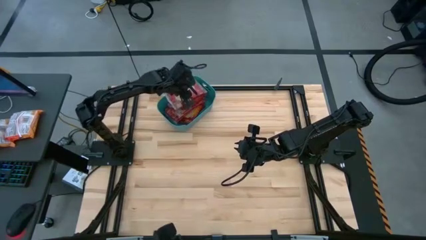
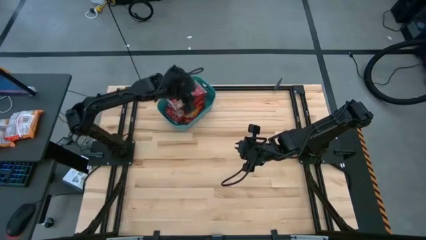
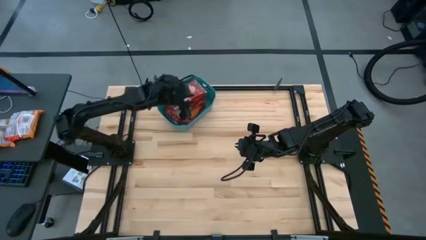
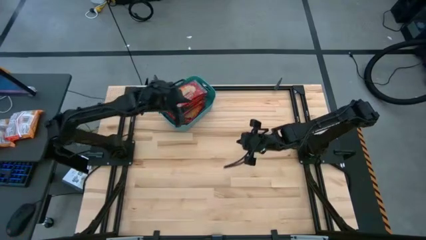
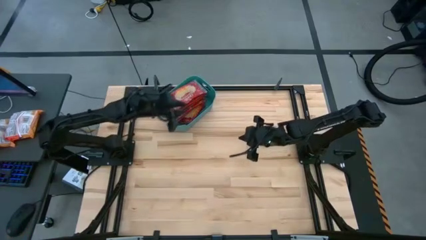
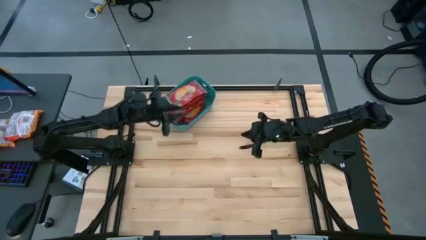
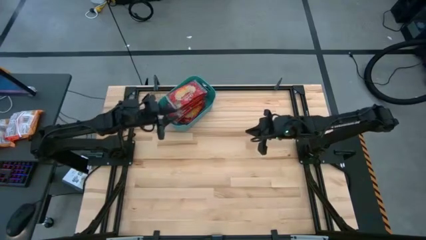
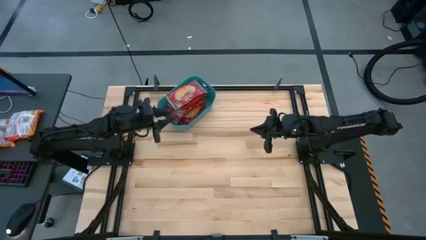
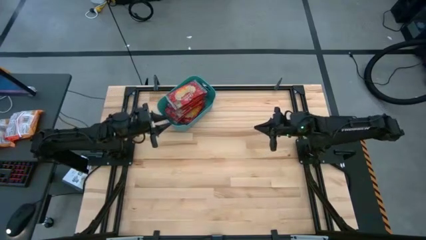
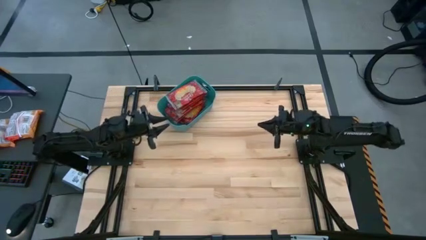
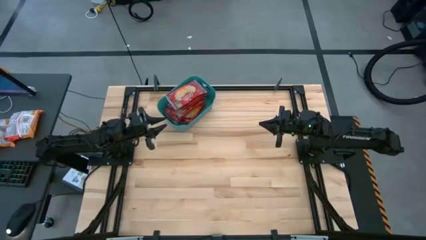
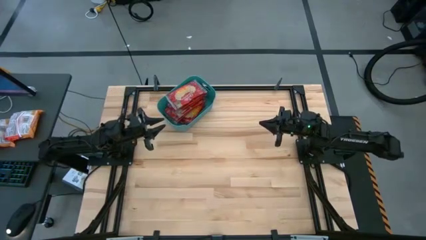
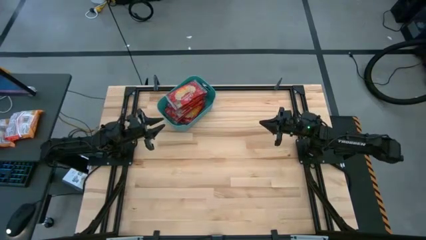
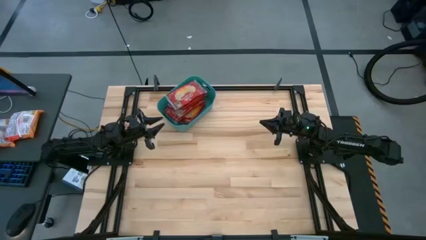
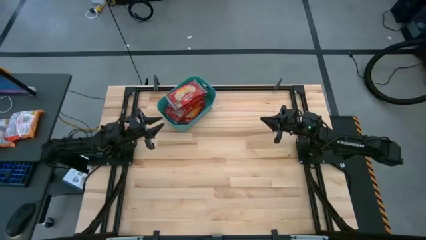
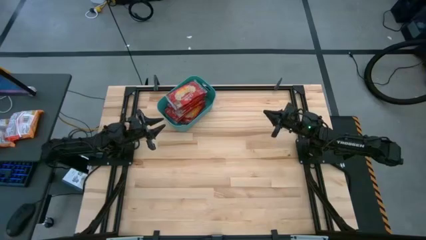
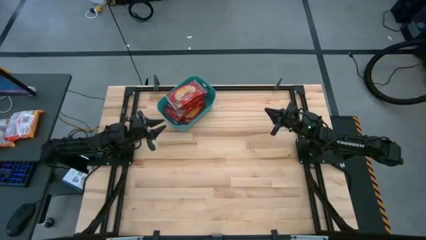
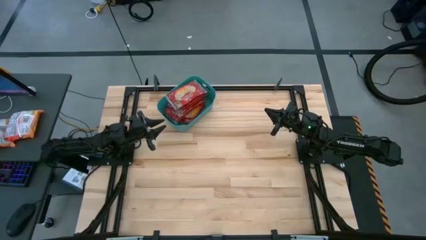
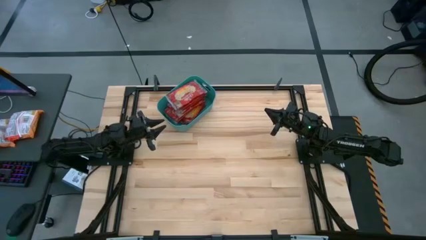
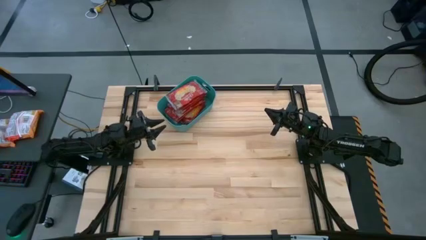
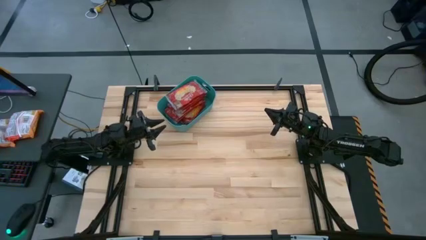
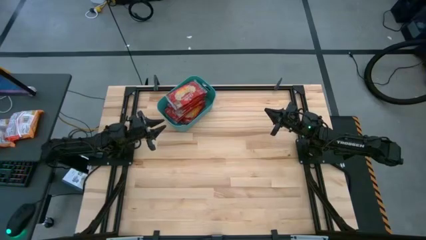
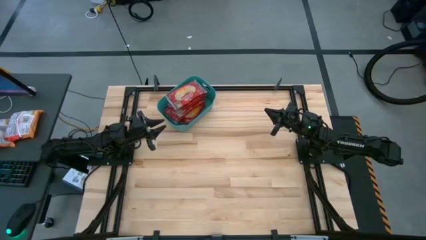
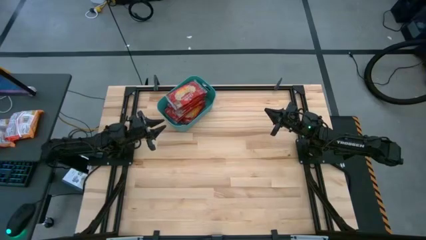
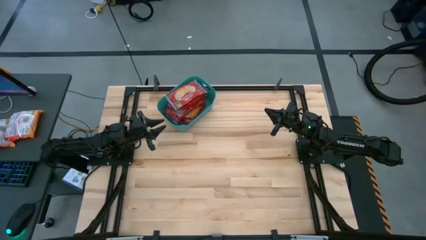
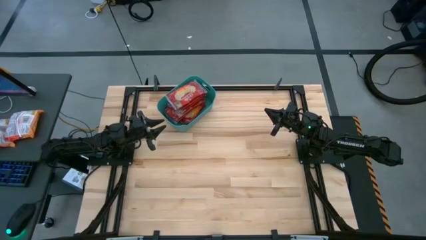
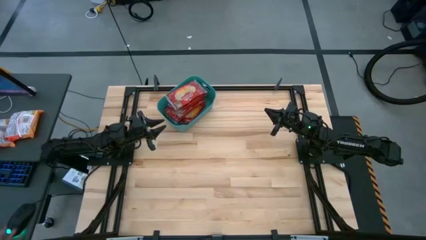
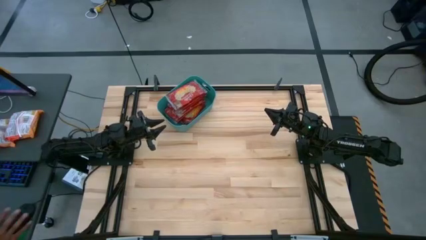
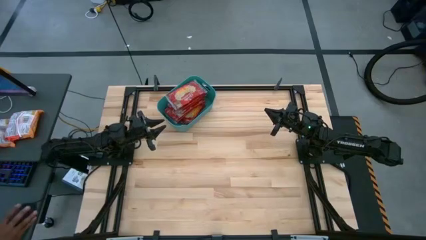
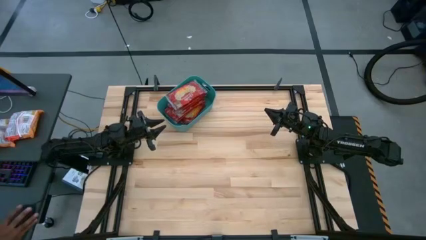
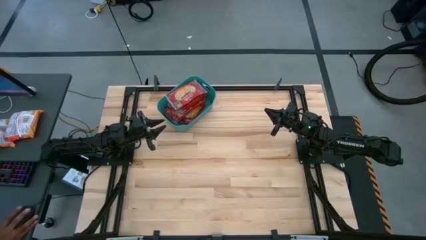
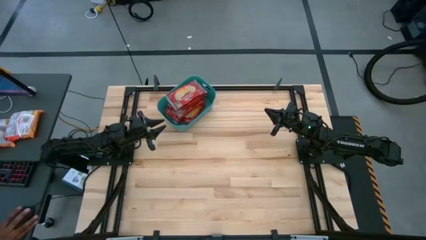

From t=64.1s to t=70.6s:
Task: Sort popcorn bags into baskets
Return to Home Position

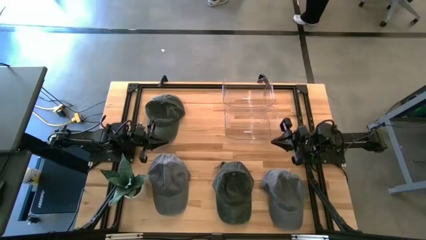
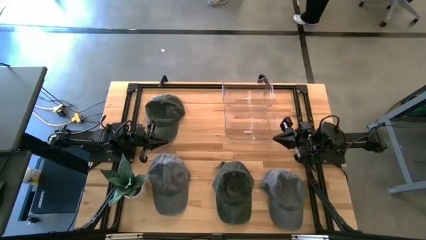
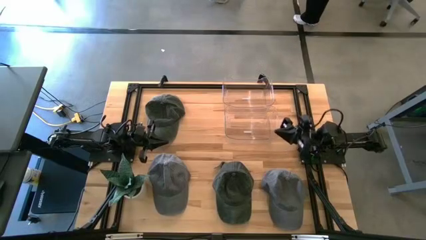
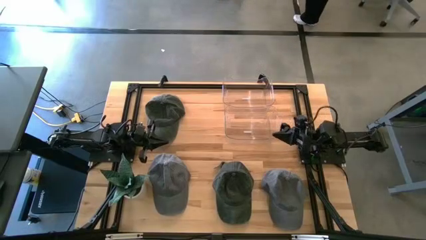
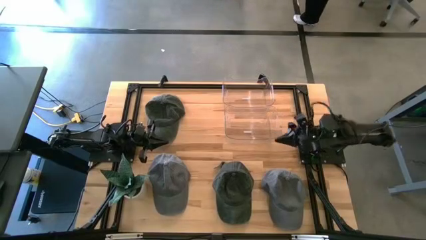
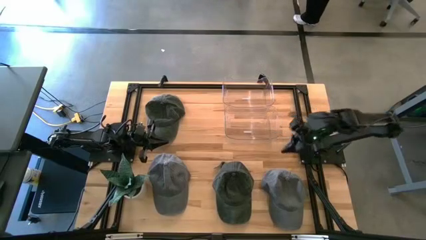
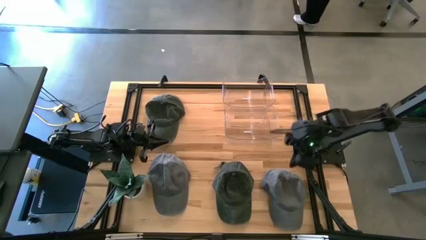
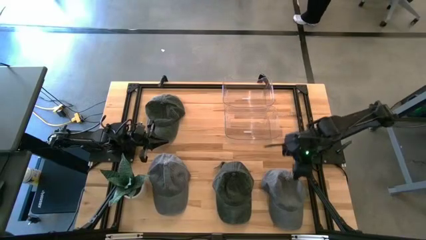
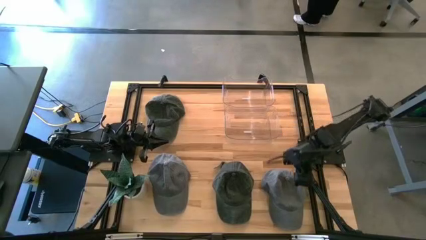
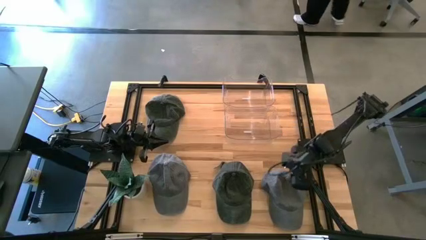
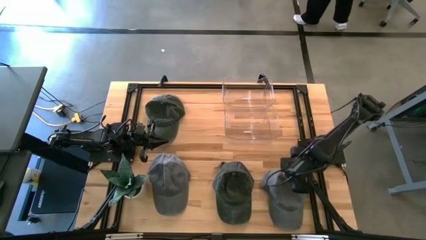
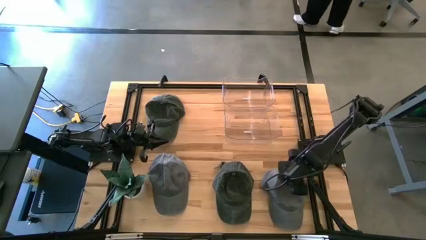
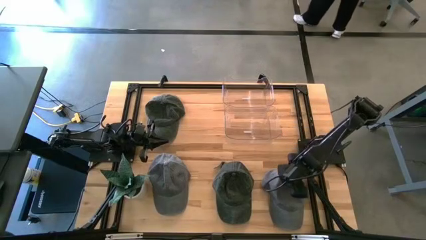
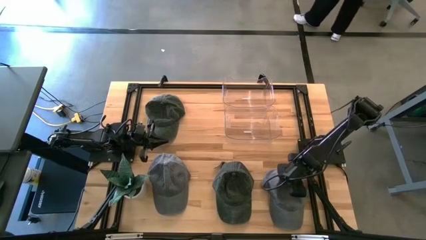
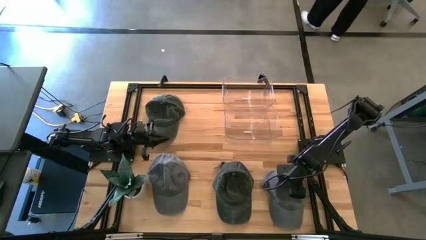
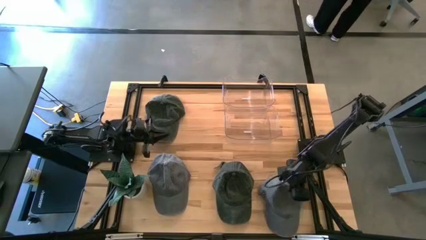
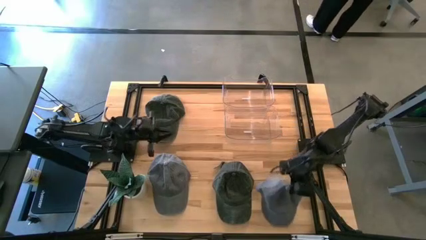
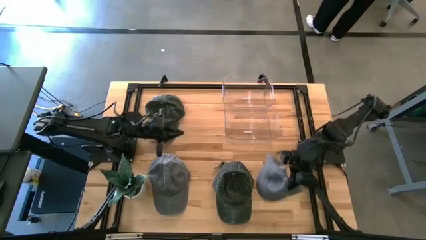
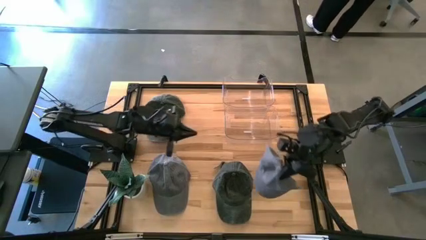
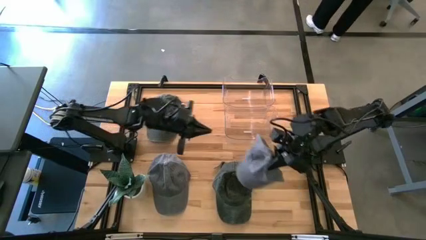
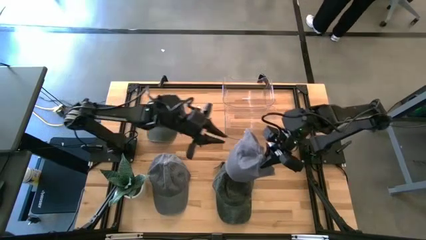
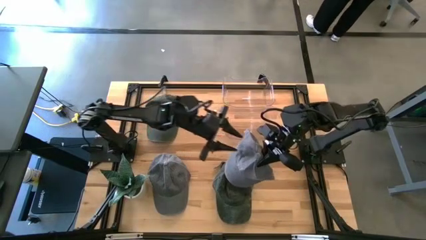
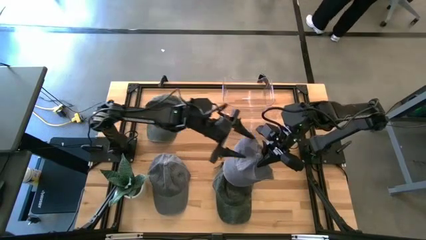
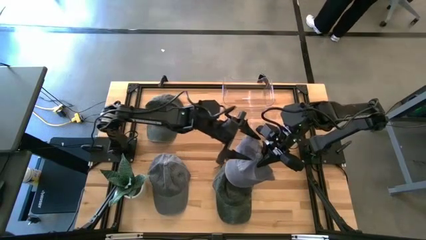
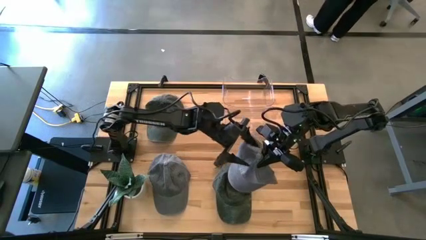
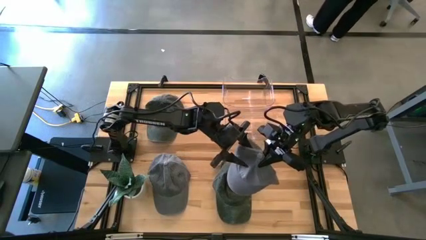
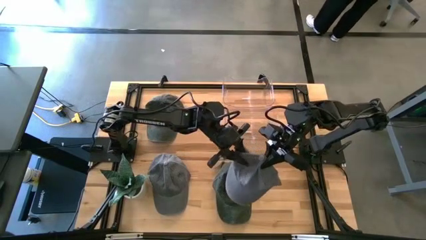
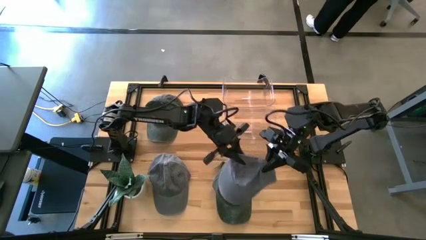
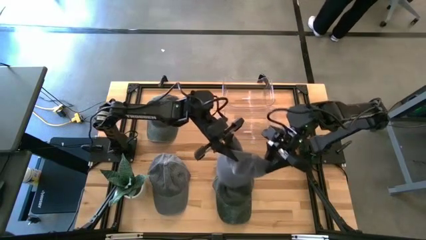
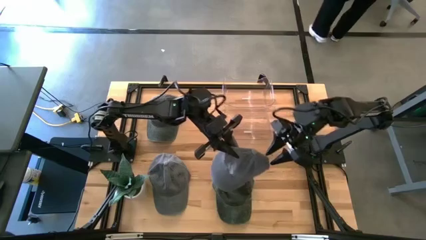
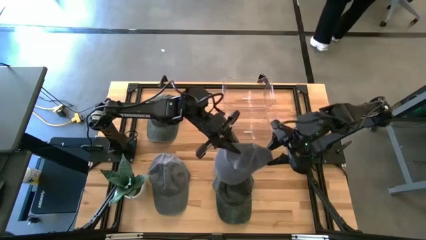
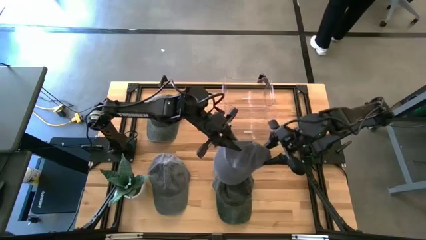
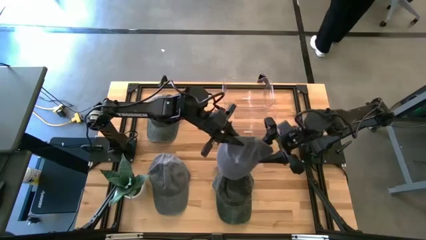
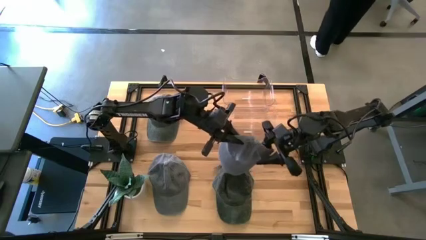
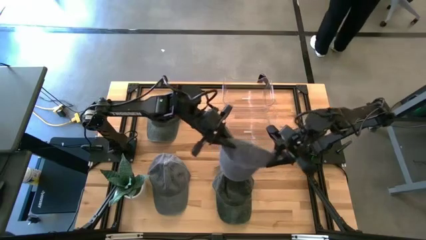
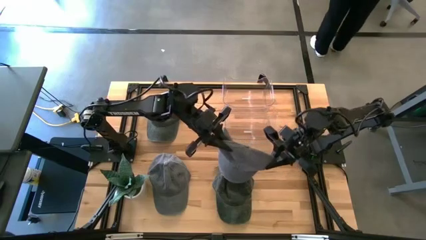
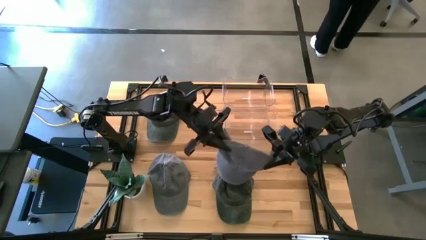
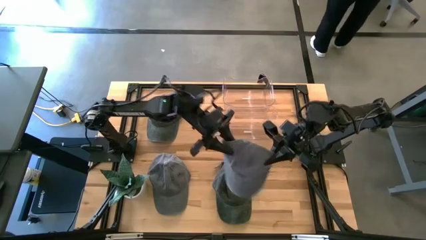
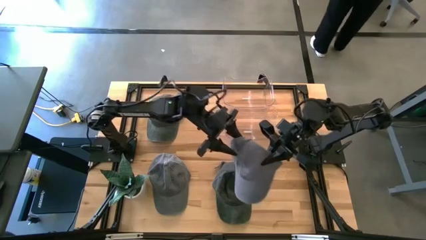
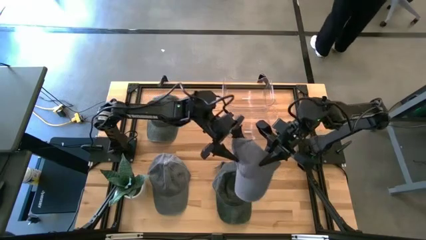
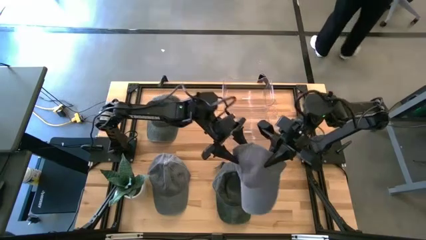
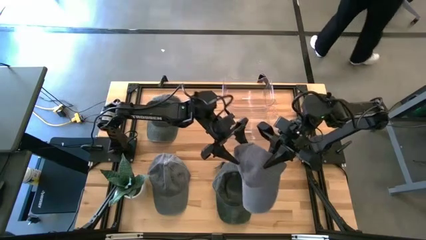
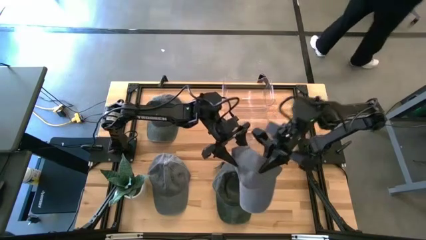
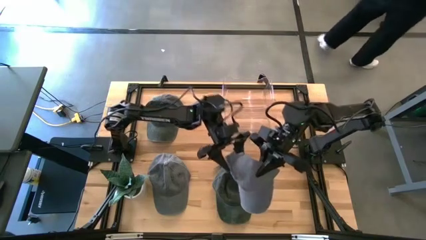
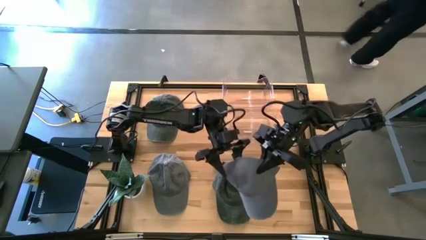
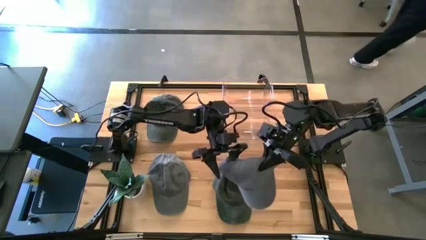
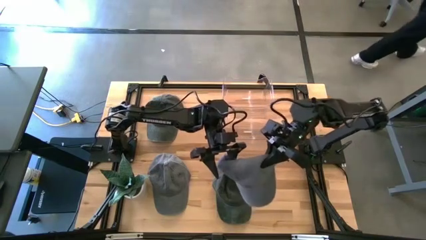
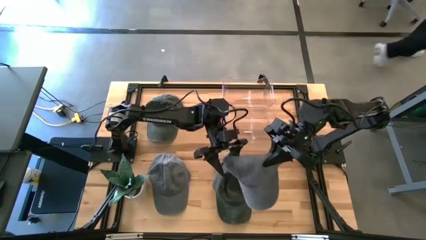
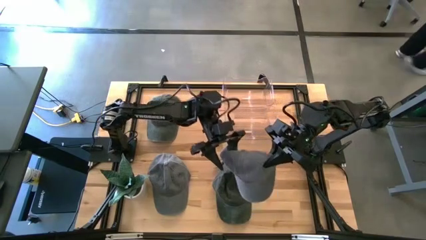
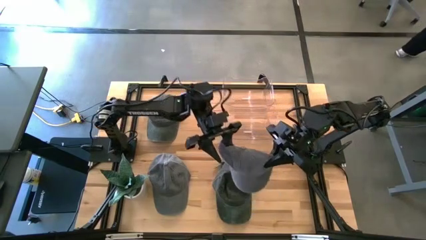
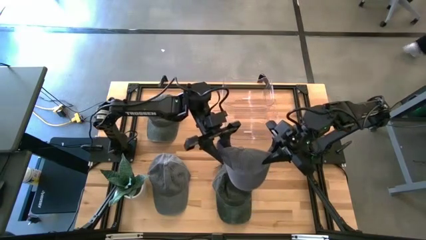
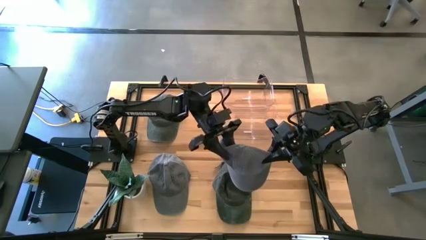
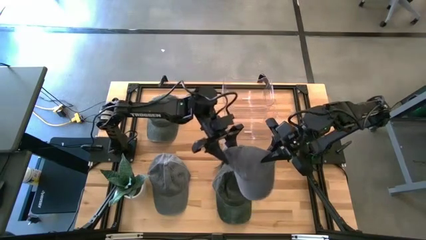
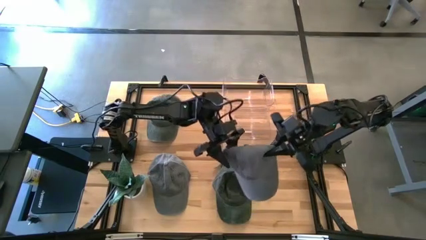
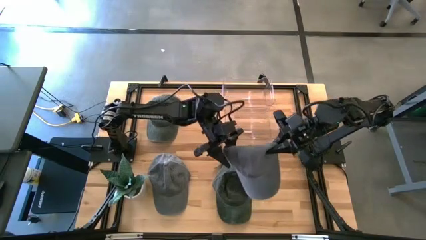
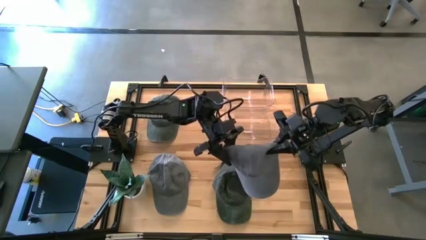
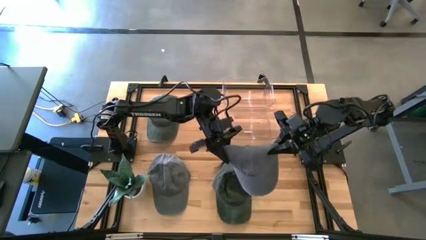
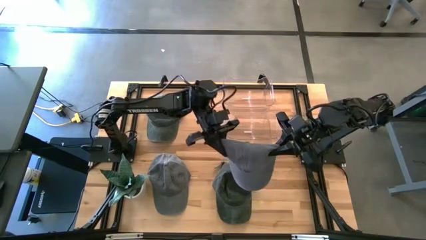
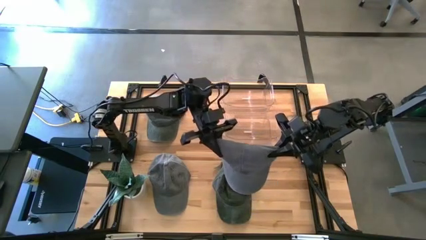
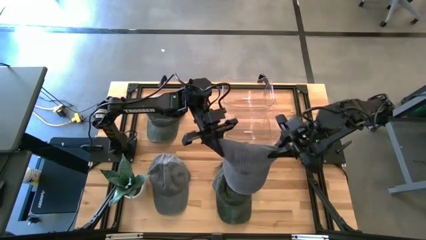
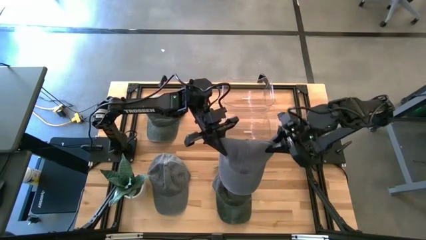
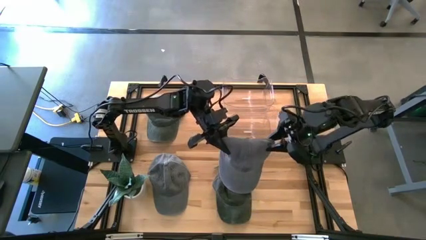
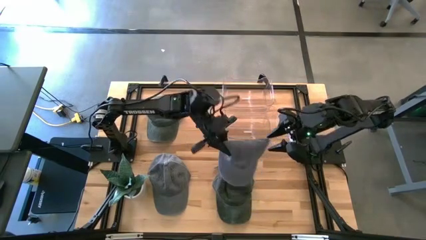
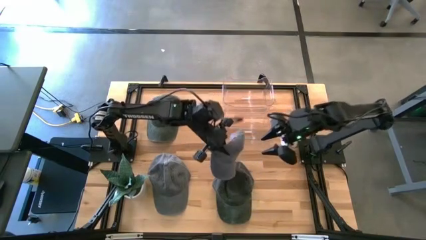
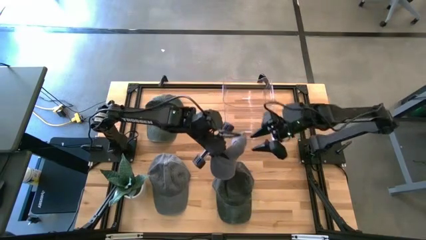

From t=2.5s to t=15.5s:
Task: Pick & Place hat
Put the right gray cap into the top transparent bin
